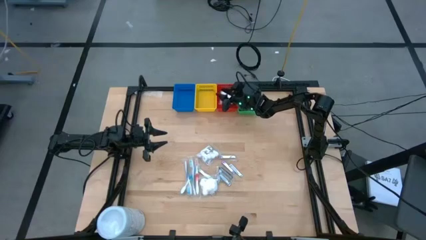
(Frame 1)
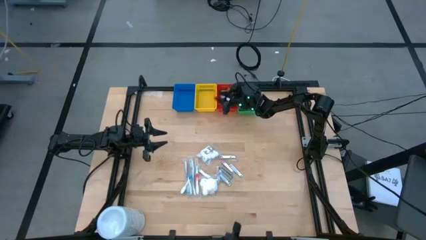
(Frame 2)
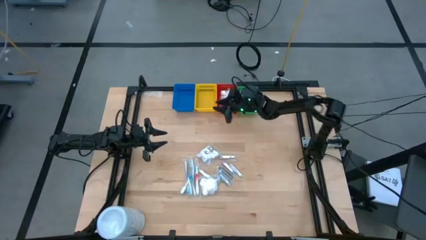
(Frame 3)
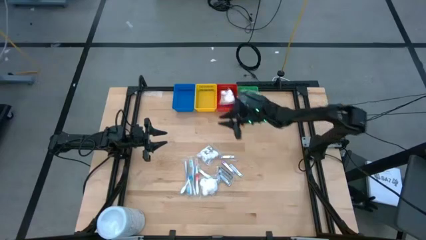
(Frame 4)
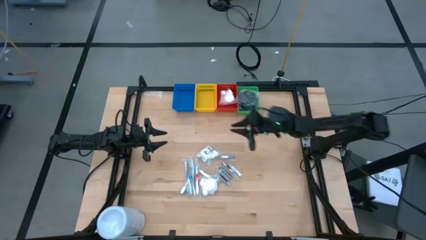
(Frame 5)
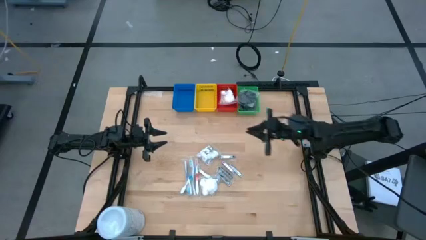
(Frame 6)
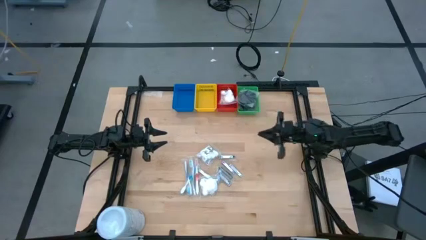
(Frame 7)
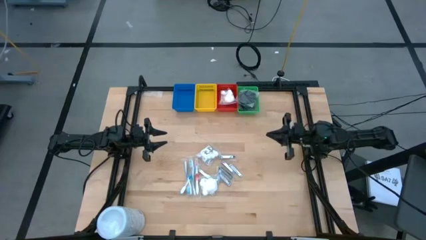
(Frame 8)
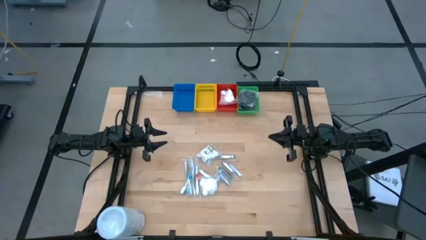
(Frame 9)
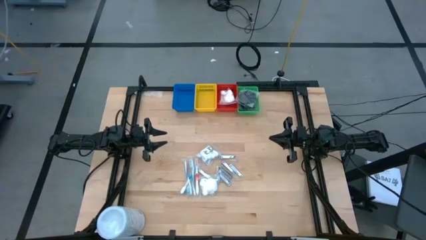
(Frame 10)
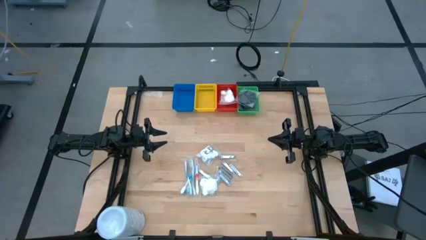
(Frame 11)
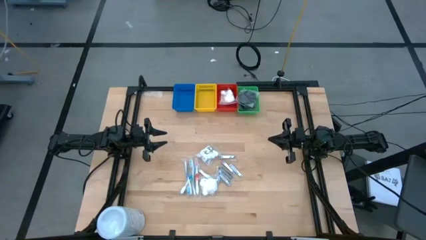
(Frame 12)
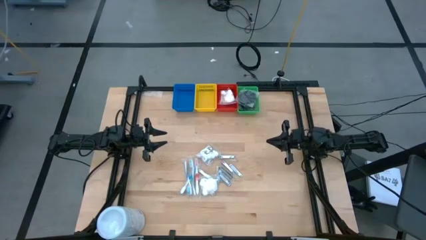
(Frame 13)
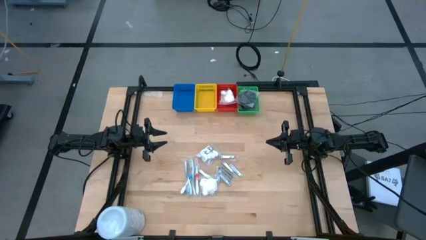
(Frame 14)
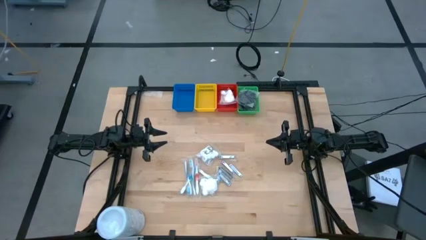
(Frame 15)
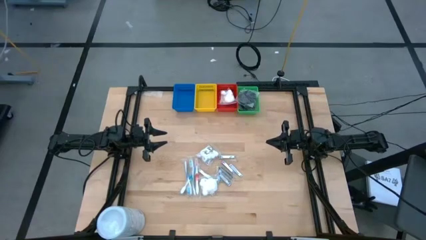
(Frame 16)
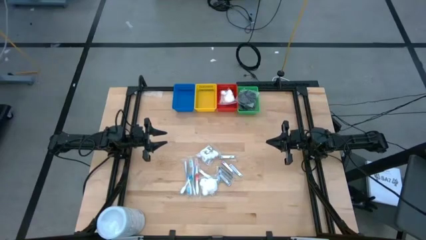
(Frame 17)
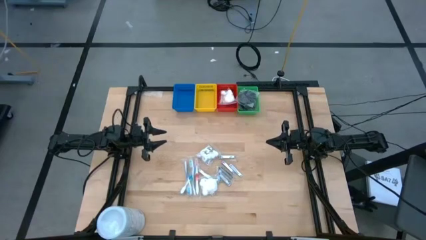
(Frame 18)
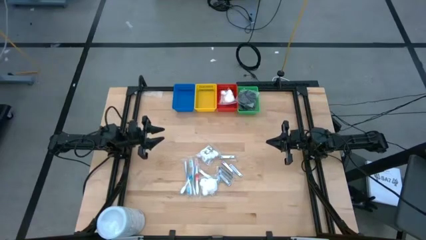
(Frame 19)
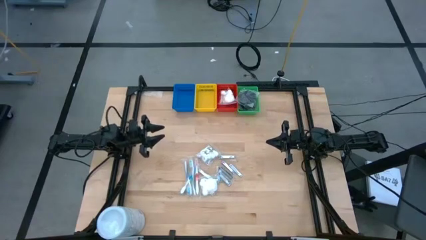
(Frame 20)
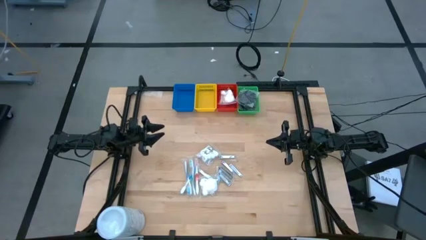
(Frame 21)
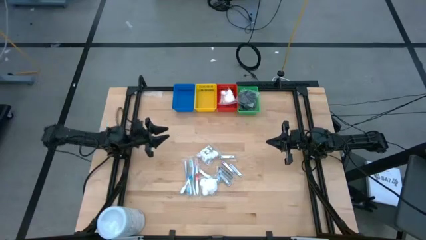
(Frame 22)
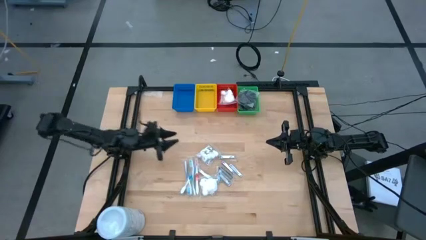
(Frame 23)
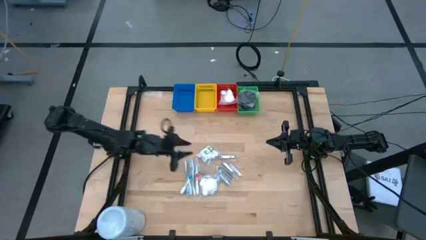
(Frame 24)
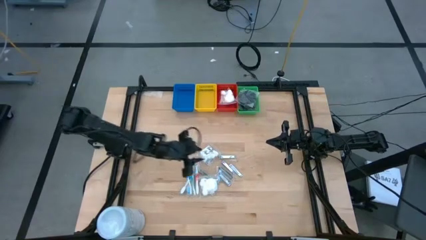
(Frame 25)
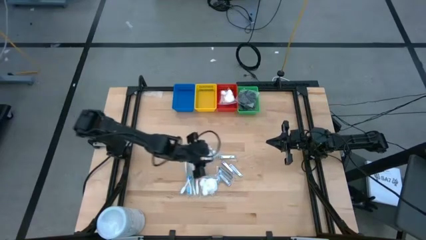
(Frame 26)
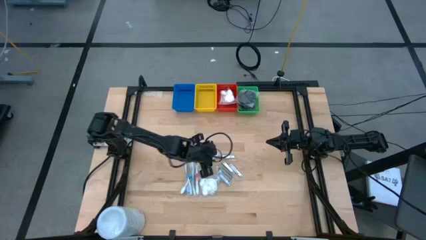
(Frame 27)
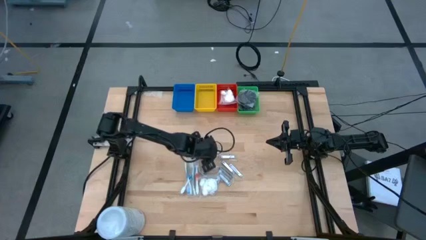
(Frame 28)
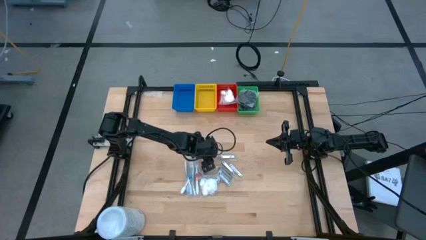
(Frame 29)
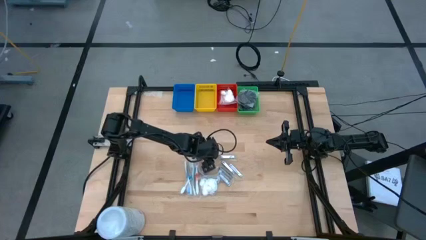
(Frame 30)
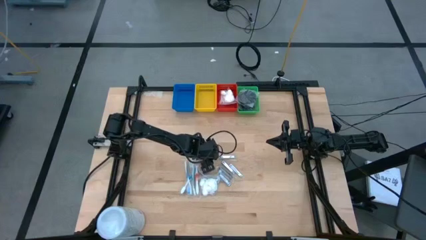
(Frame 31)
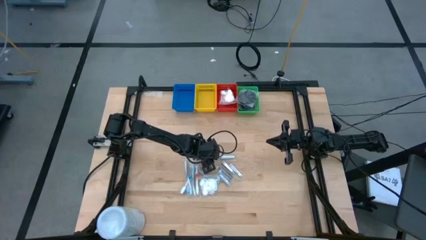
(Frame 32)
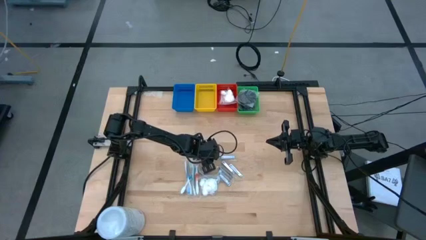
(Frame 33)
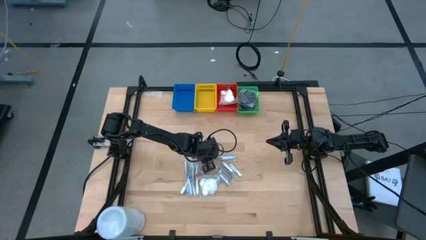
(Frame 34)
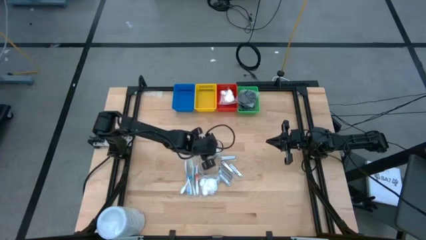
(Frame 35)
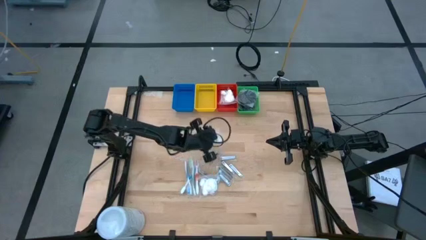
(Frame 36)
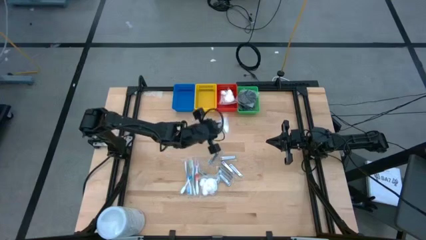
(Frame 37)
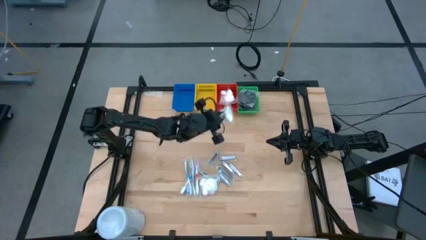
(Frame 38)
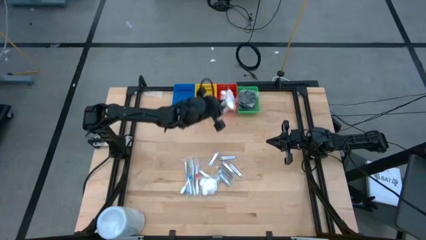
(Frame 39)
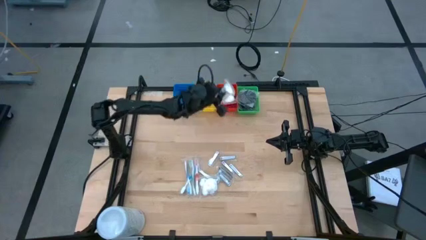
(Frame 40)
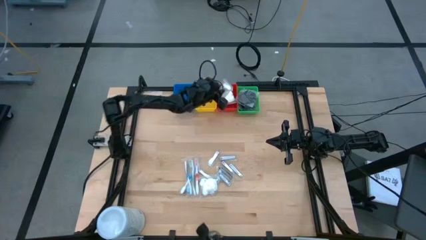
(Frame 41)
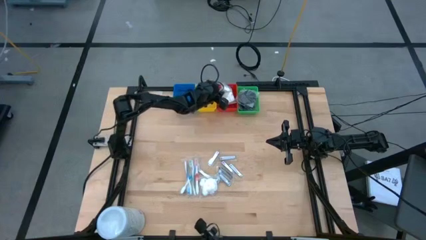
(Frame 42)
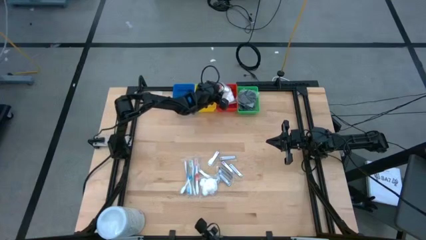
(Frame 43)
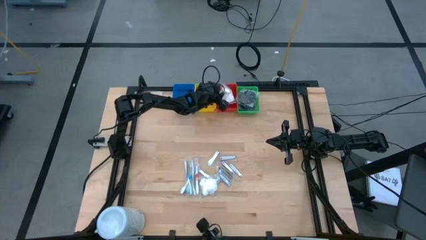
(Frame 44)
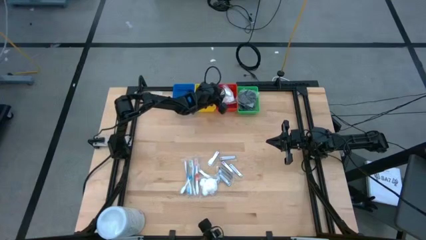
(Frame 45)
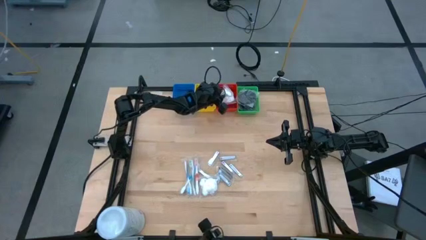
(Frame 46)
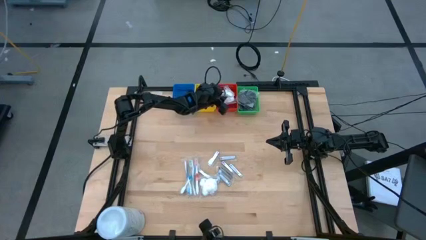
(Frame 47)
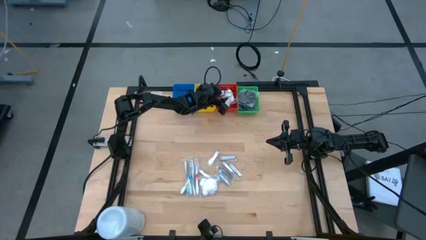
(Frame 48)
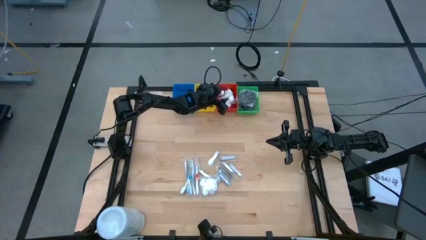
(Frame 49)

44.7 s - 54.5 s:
Task: Pick & Place Travel size toiletries
Put the cotton pack into the red bin

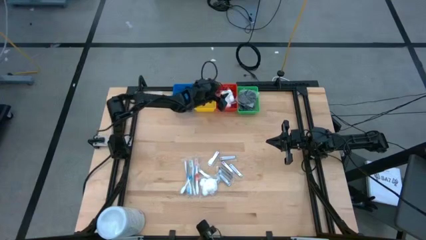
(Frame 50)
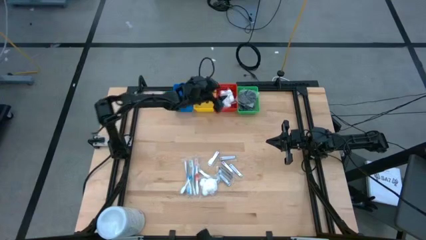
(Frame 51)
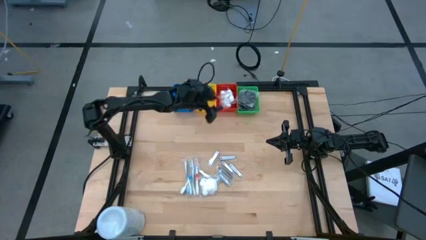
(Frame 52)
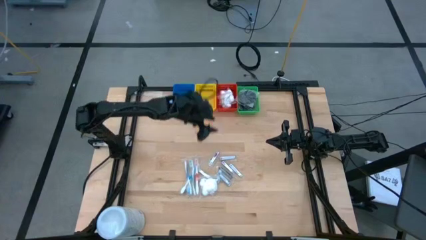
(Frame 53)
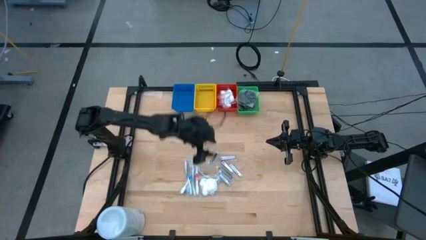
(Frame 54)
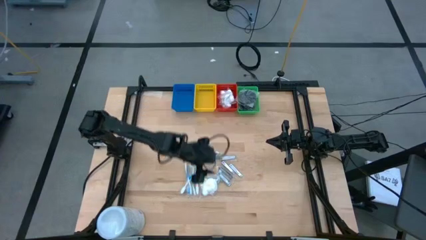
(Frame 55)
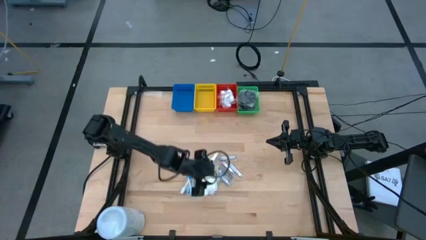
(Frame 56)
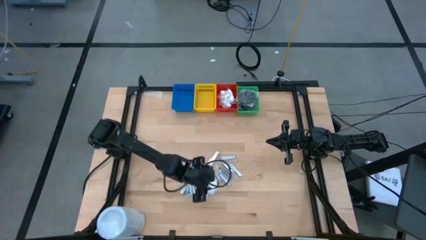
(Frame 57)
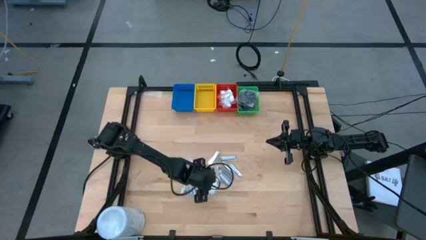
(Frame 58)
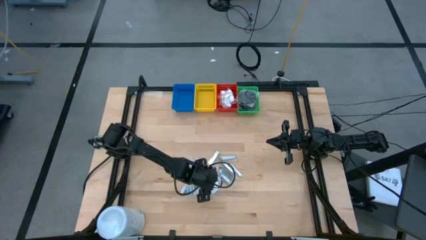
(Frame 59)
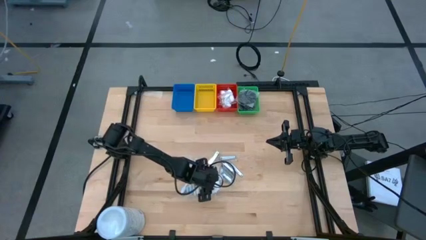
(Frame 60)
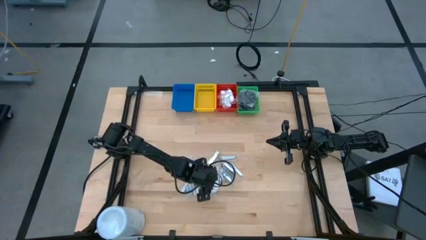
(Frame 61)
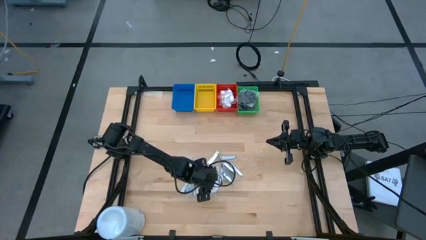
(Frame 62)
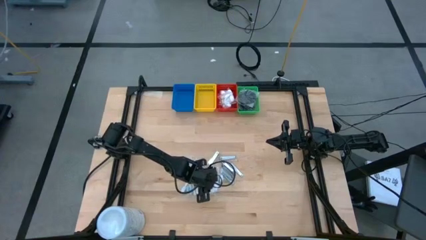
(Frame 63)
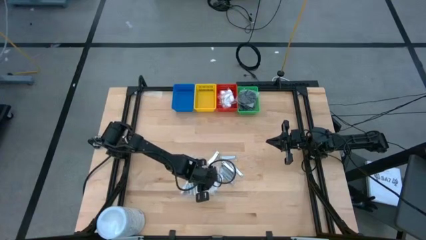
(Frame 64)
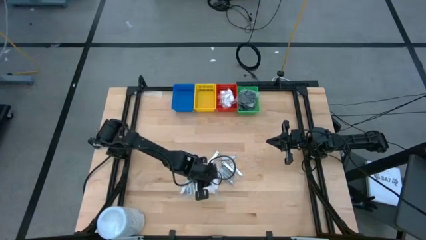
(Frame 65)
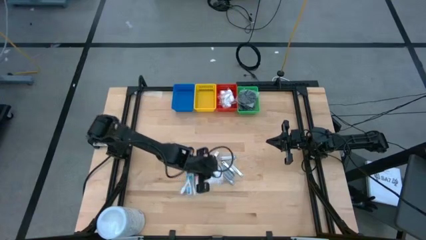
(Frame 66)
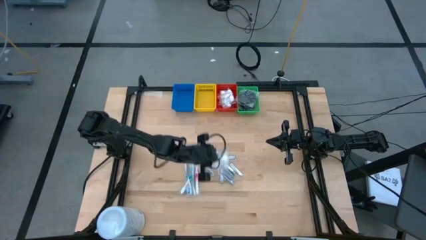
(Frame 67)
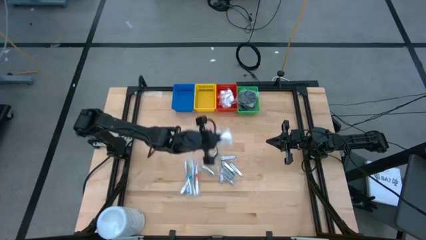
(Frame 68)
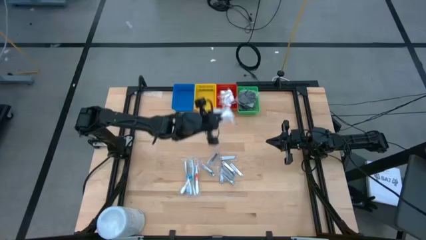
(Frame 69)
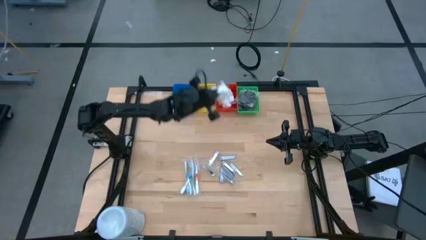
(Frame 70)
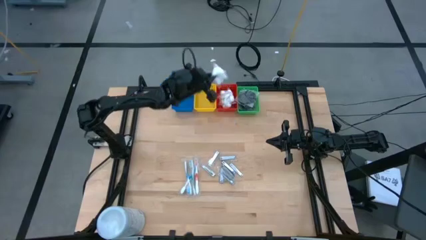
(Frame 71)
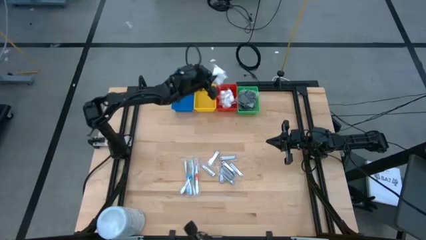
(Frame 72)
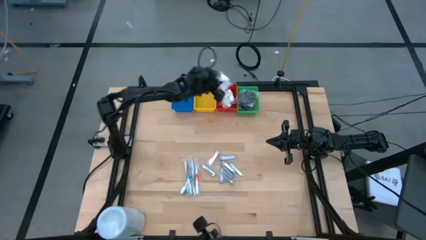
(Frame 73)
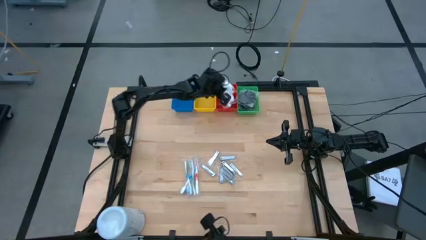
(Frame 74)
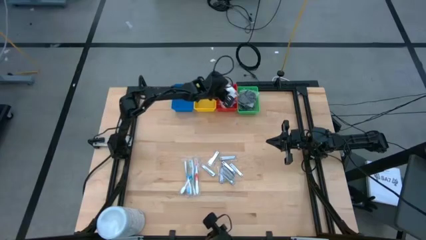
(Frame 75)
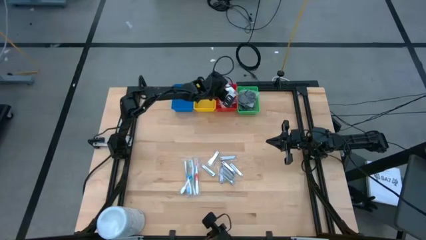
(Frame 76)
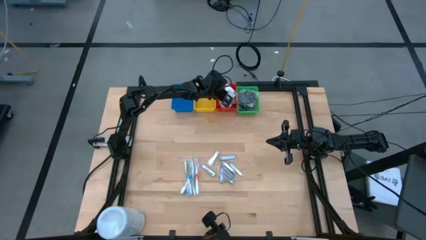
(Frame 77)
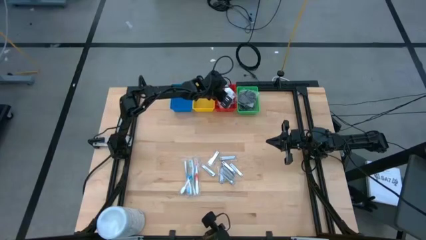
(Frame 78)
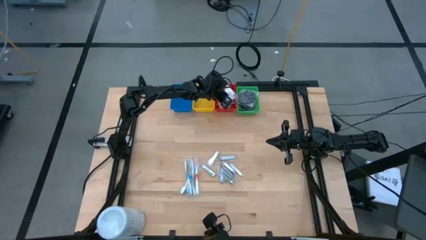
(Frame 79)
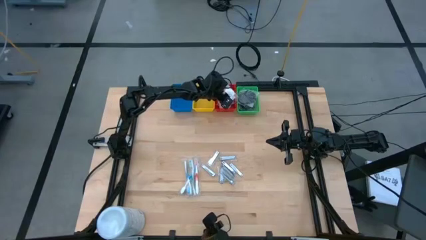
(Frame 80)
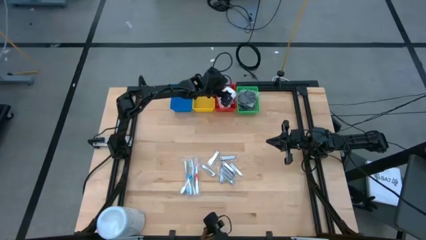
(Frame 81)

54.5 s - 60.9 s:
Put the cotton pack into the red bin
